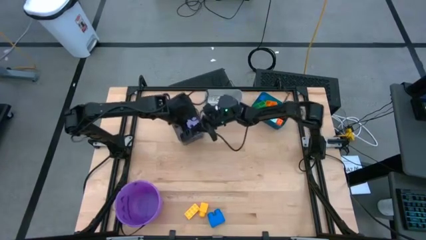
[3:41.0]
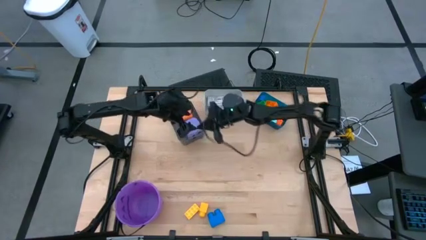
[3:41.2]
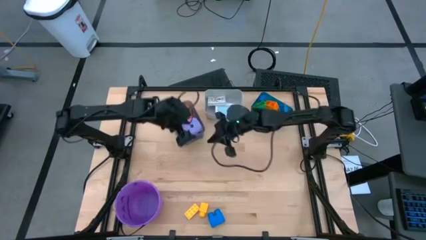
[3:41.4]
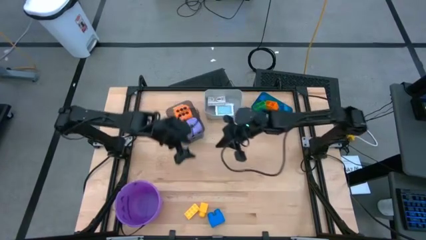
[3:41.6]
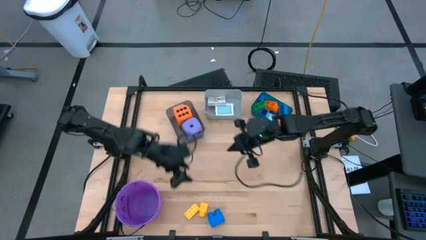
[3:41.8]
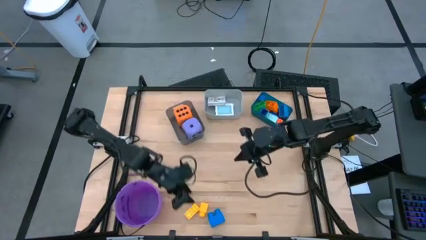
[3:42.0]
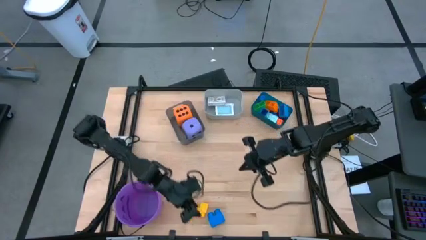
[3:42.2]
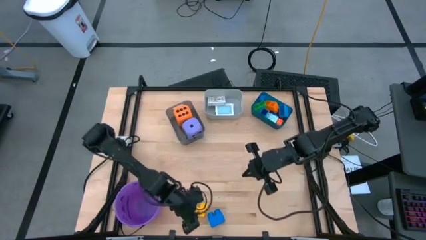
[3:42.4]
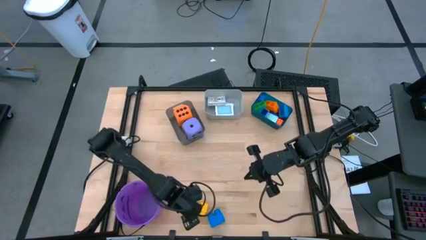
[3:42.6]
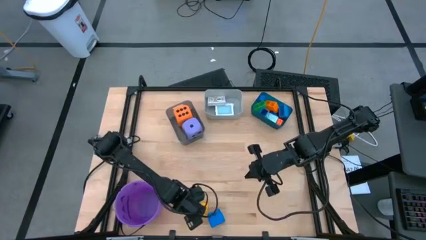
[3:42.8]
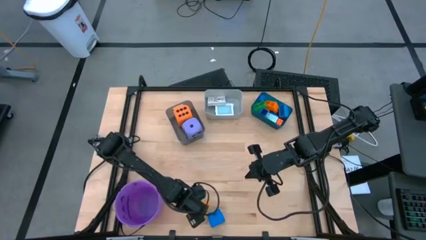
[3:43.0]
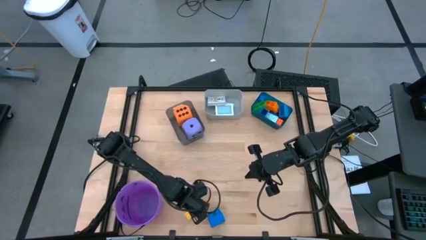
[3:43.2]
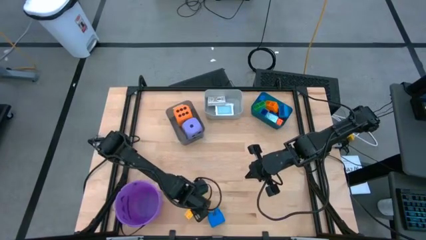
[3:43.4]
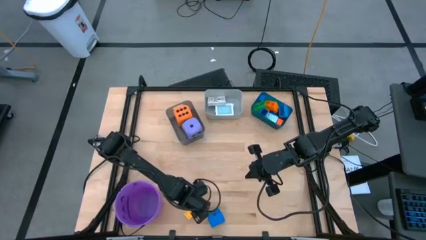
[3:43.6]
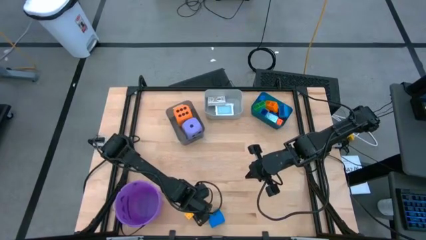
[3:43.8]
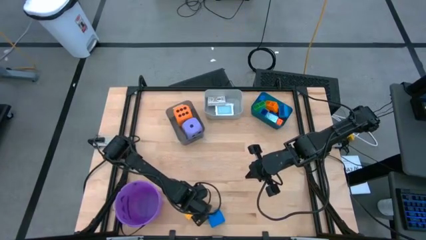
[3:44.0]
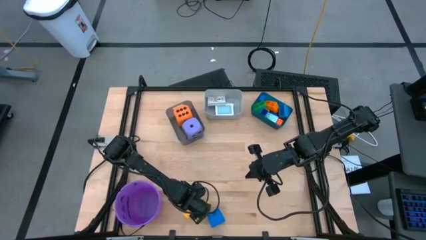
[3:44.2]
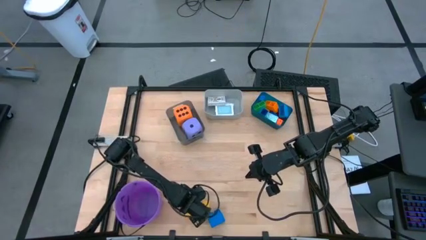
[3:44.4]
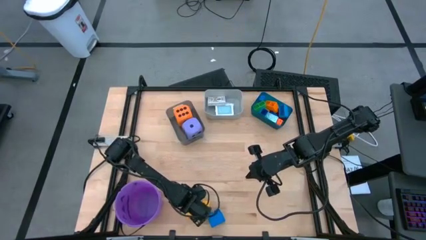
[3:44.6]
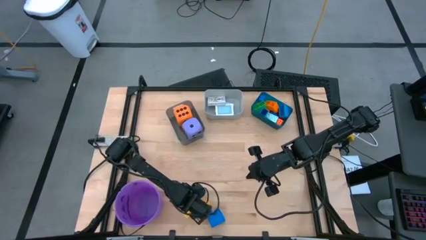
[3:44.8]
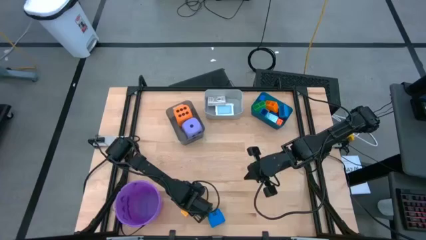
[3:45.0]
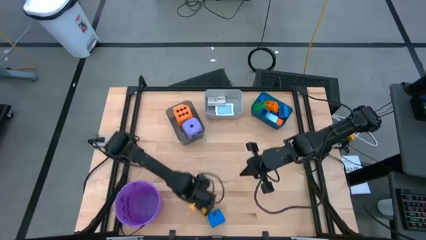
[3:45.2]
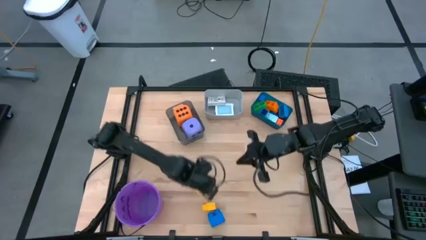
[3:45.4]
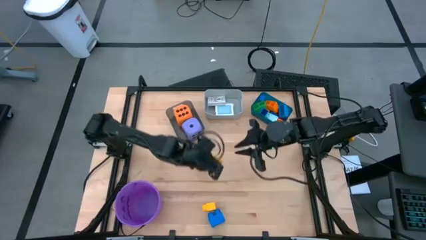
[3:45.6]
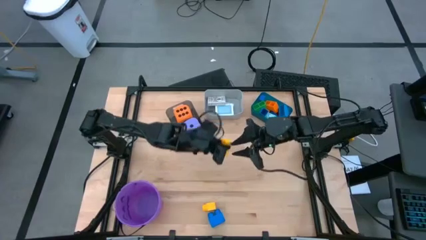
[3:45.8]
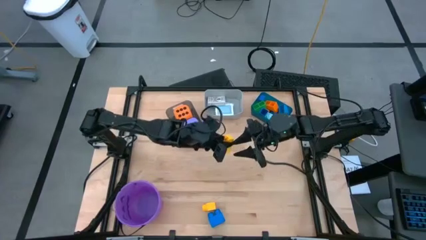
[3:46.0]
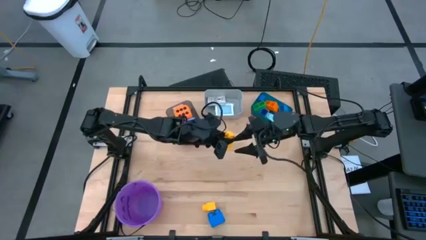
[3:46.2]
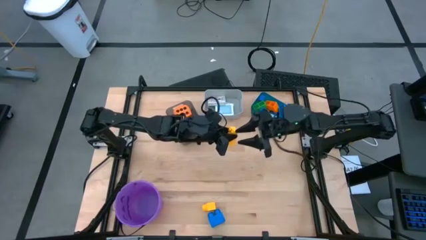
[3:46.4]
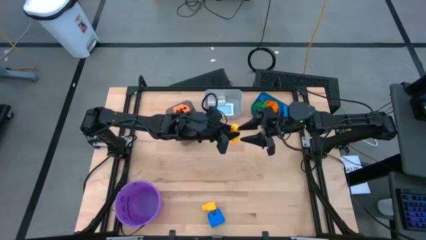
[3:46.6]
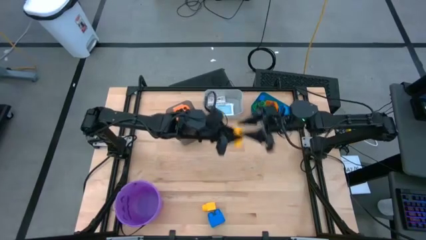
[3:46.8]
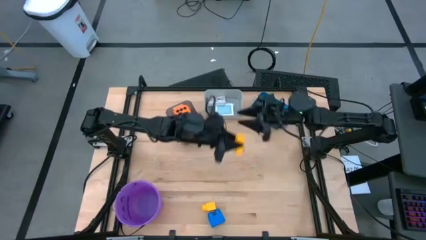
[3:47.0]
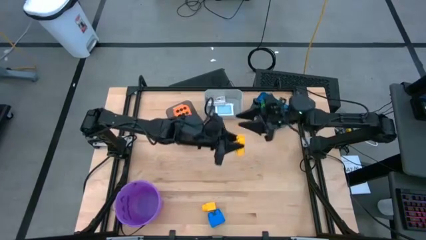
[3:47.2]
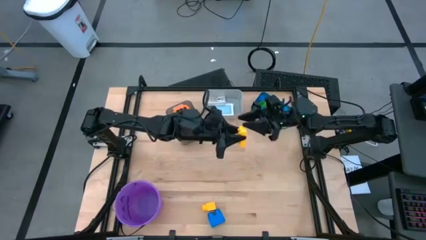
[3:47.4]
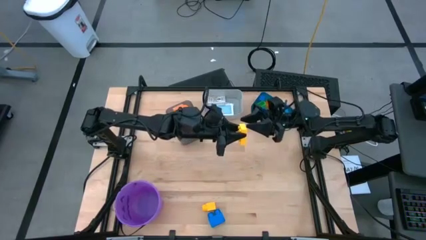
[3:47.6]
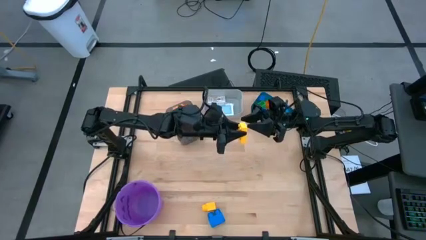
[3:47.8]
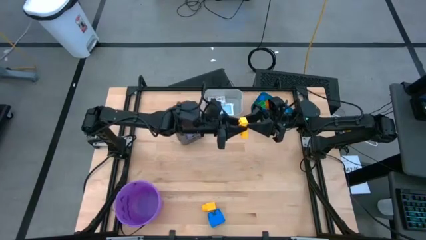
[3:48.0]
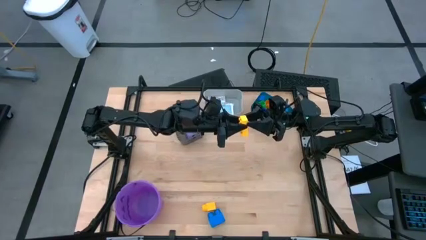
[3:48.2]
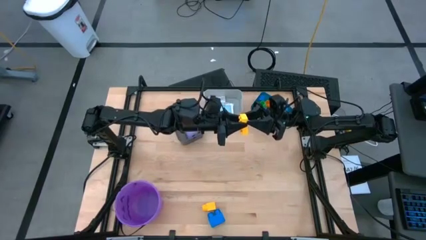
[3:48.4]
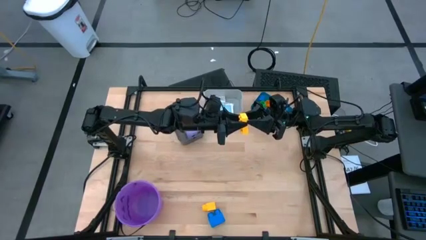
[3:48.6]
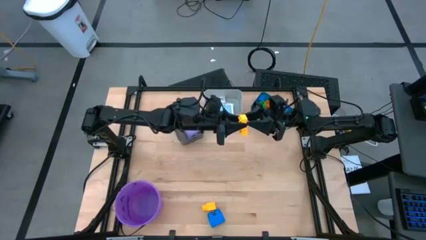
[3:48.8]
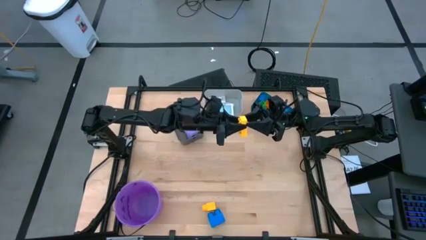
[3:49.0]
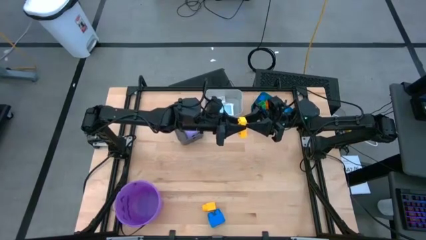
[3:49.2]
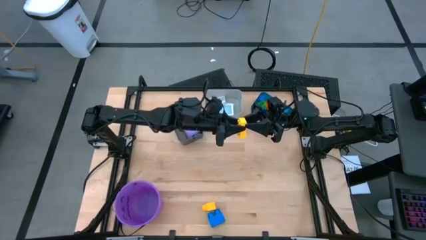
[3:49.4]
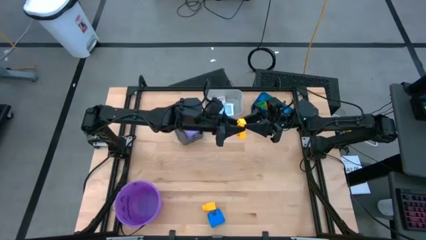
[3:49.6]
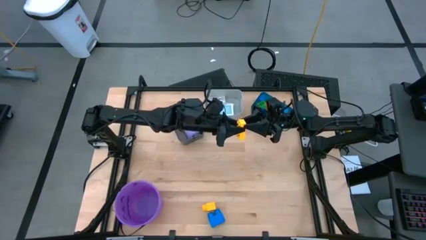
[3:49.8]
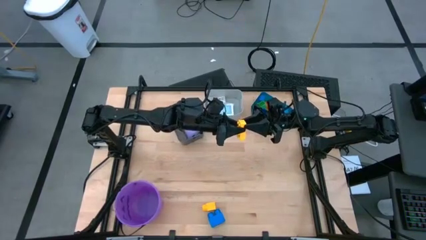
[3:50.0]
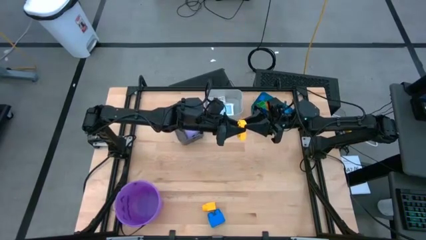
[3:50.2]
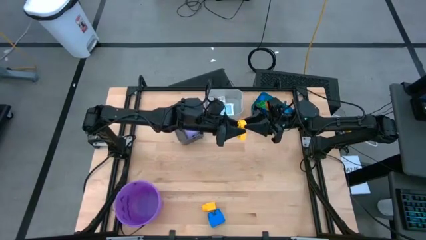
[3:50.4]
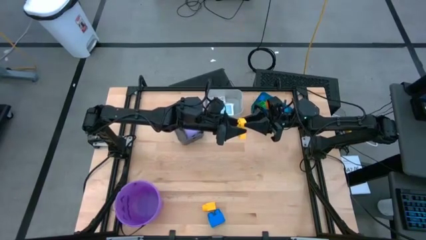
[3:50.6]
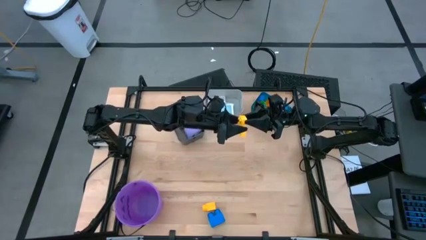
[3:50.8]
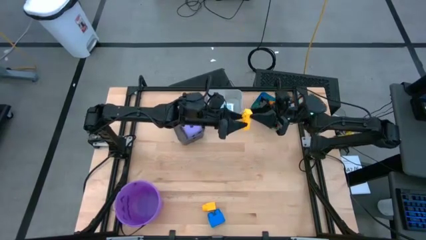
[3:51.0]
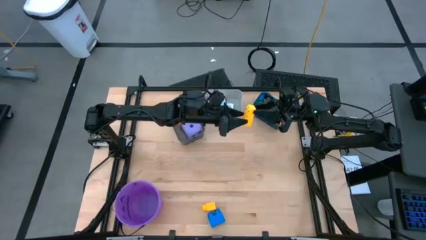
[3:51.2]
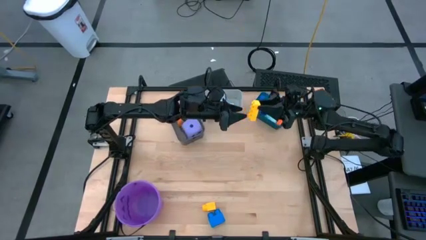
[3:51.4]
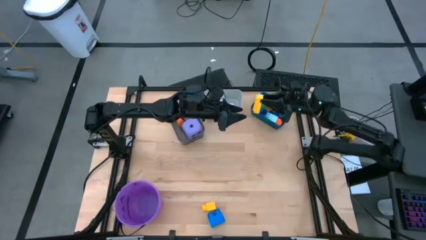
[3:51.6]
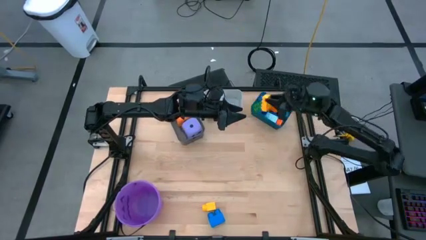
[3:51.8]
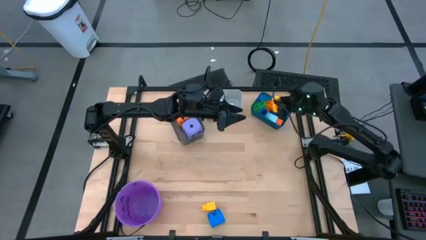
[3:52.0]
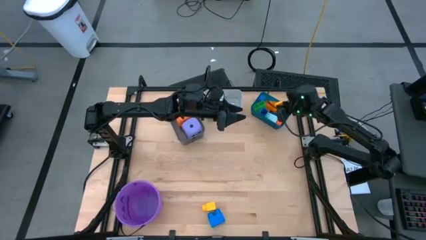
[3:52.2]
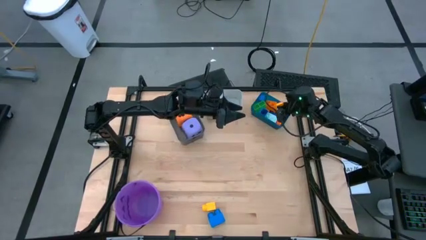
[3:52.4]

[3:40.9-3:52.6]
Task: Pick & Place Toys
Put the yellow game piece into the blue bin

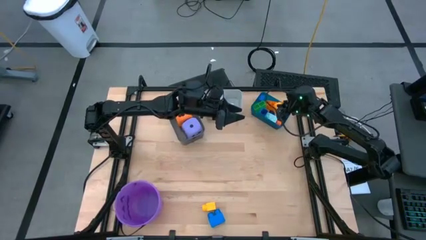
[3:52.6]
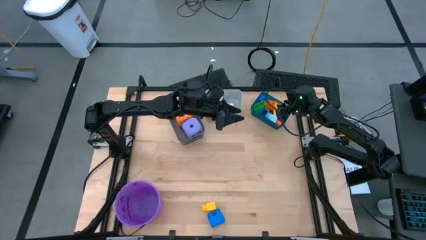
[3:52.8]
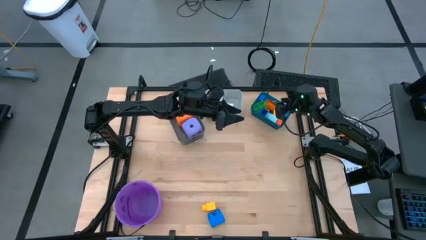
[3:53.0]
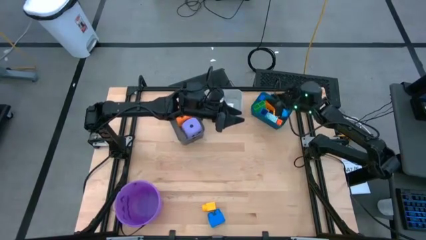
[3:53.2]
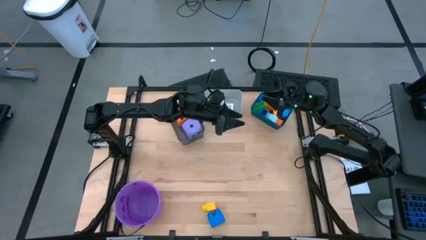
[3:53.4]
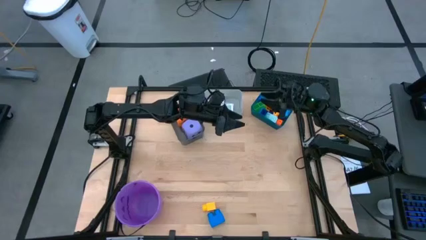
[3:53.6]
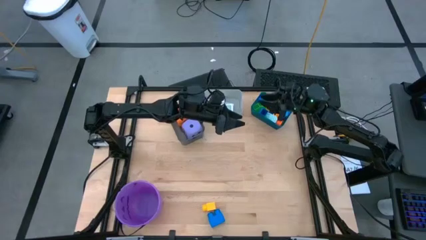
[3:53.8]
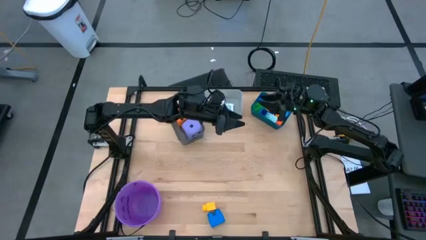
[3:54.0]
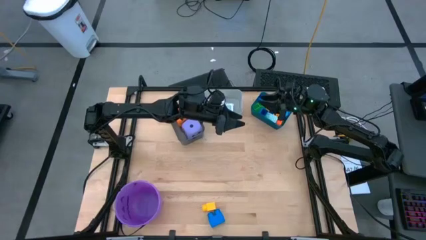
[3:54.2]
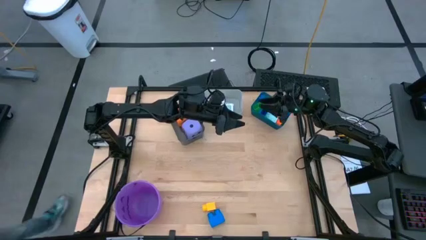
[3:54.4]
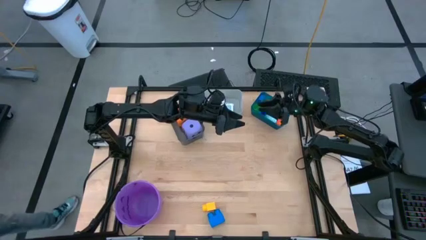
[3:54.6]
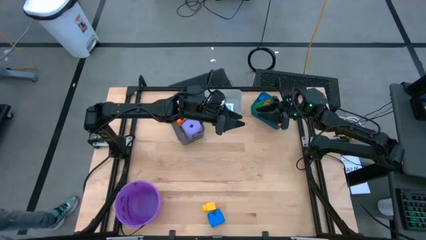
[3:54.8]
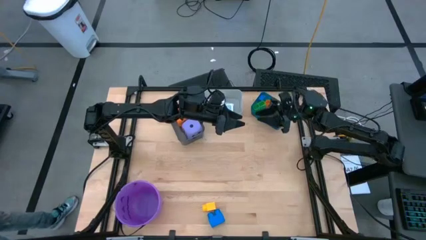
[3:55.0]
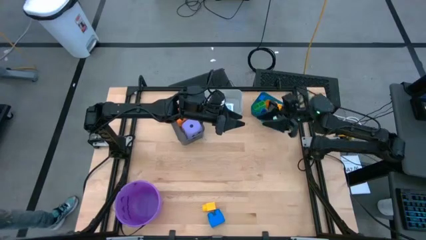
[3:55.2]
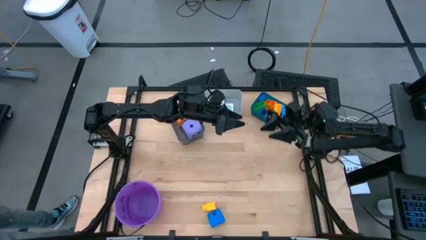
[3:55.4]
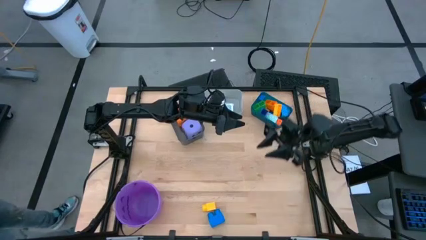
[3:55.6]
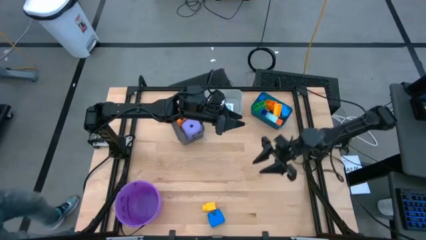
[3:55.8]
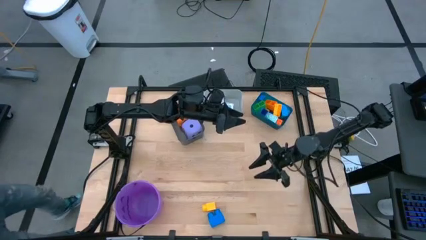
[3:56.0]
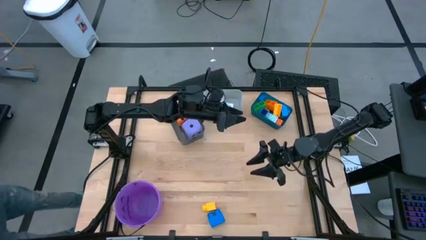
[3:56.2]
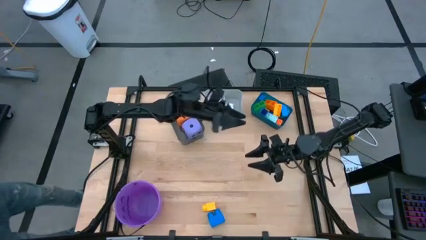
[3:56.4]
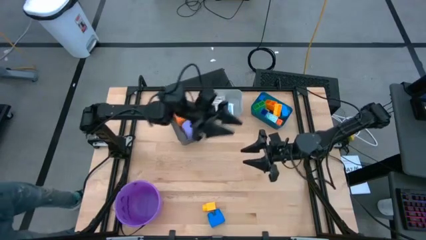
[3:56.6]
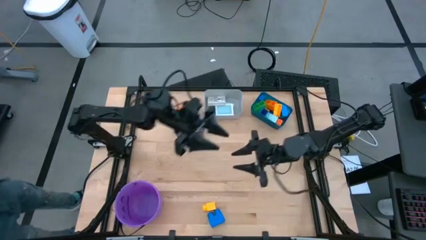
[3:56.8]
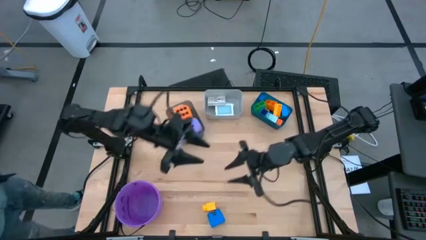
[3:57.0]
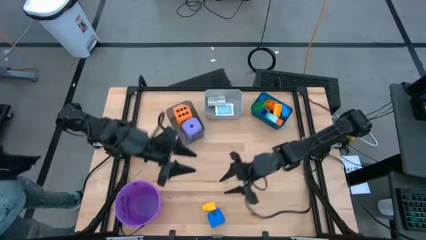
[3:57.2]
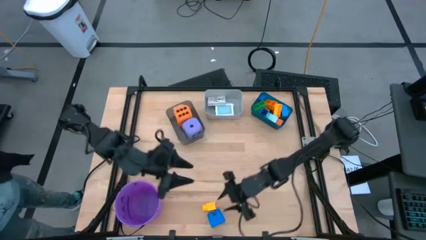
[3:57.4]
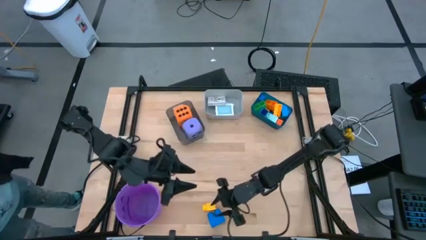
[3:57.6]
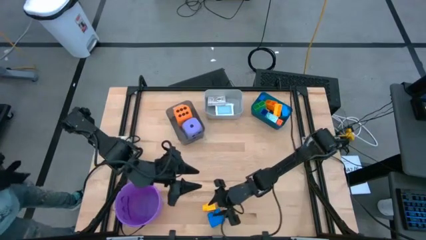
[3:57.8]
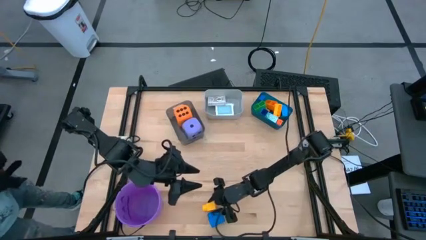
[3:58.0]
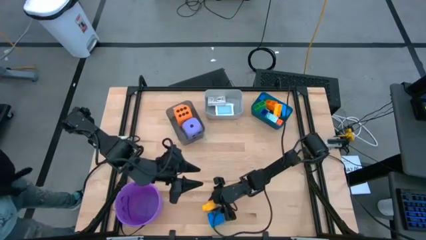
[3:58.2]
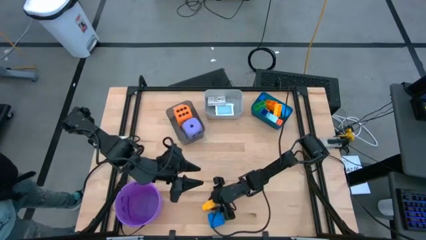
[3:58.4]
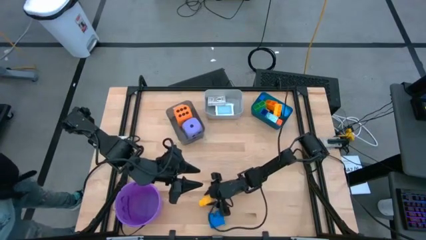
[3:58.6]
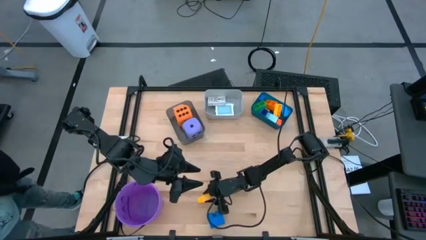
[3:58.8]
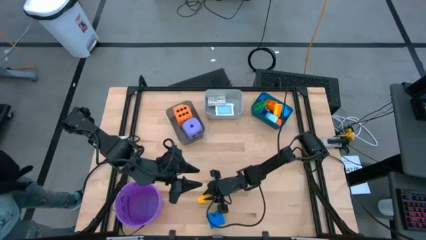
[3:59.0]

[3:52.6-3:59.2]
Put the yellow game piece into the blue bin
